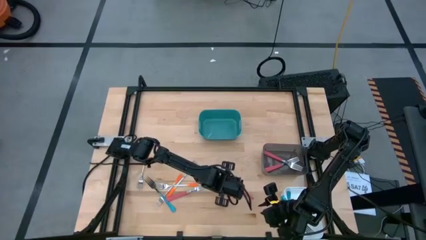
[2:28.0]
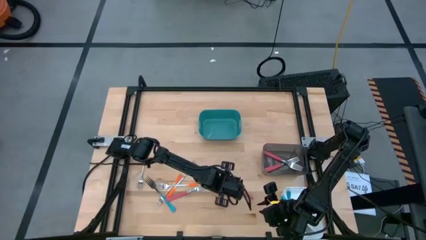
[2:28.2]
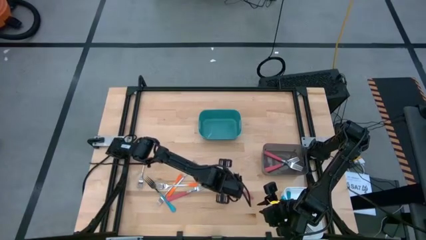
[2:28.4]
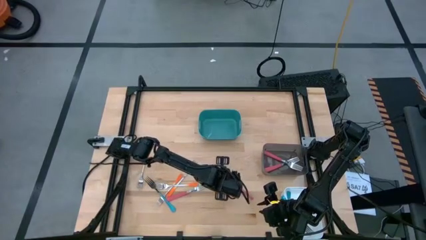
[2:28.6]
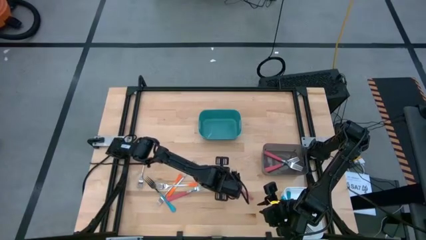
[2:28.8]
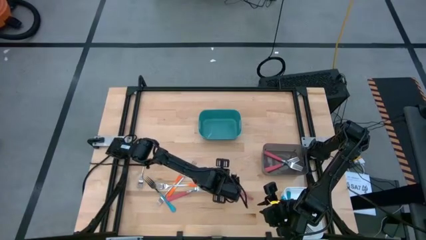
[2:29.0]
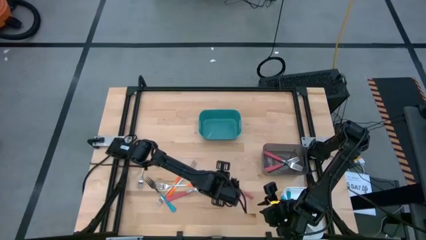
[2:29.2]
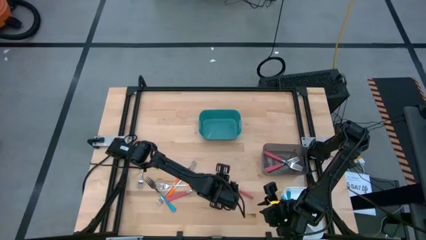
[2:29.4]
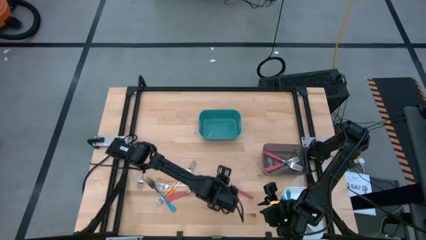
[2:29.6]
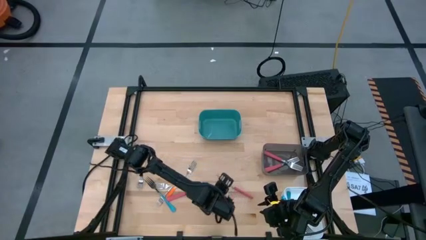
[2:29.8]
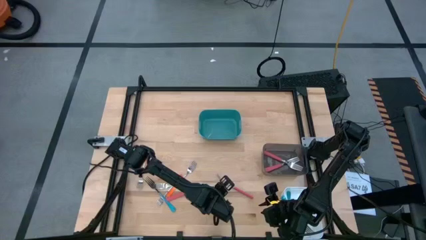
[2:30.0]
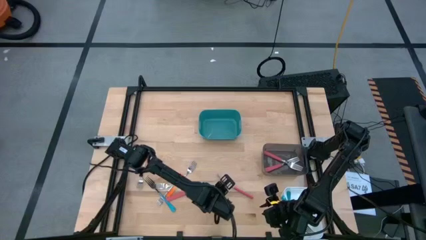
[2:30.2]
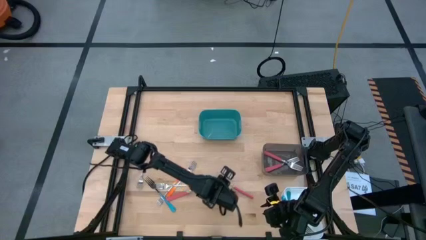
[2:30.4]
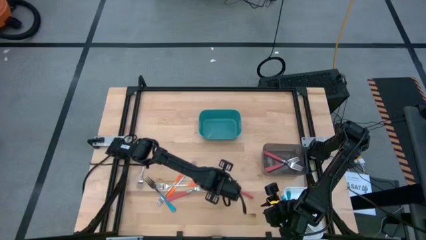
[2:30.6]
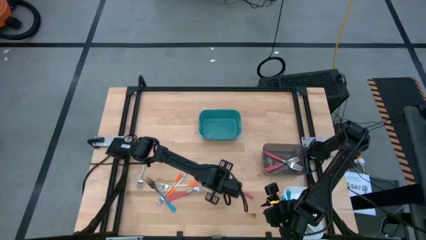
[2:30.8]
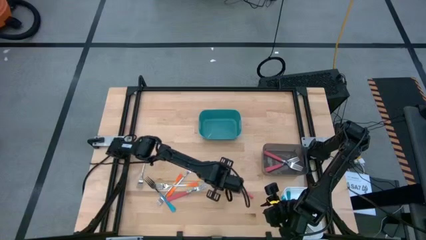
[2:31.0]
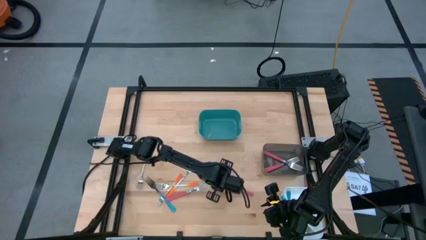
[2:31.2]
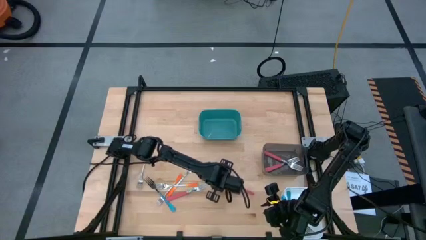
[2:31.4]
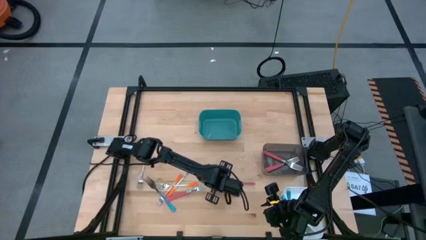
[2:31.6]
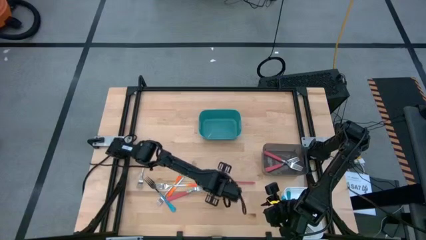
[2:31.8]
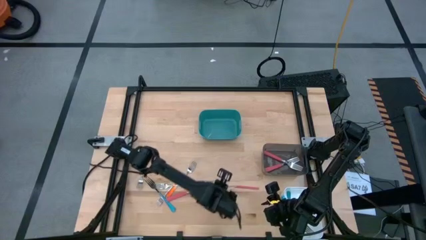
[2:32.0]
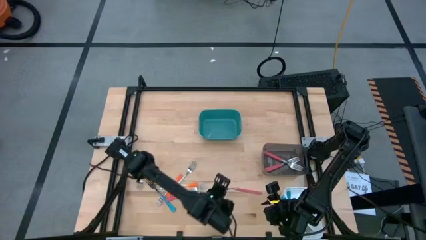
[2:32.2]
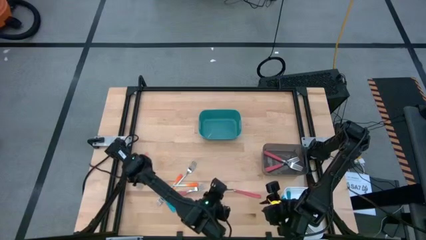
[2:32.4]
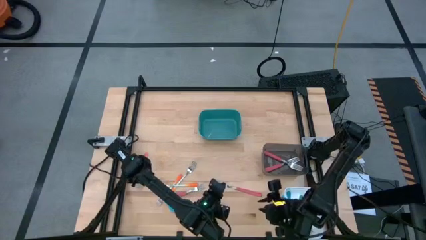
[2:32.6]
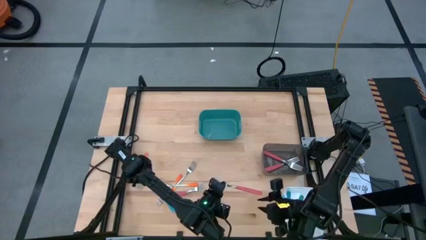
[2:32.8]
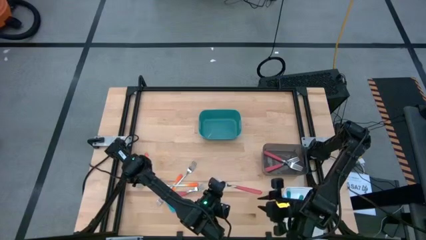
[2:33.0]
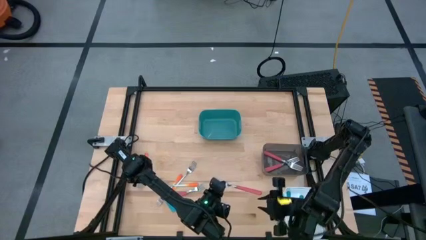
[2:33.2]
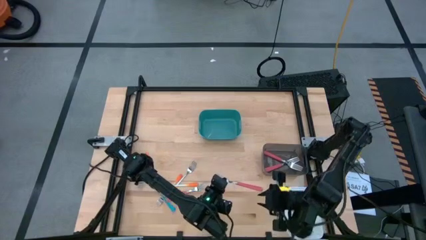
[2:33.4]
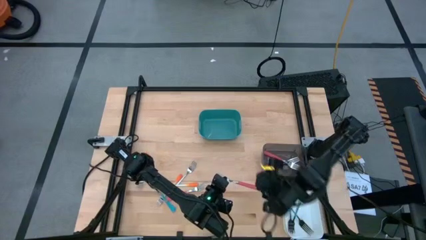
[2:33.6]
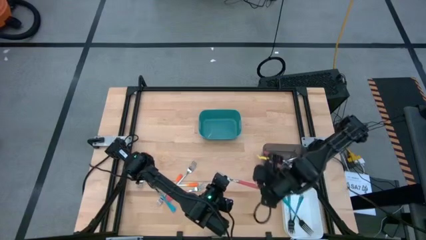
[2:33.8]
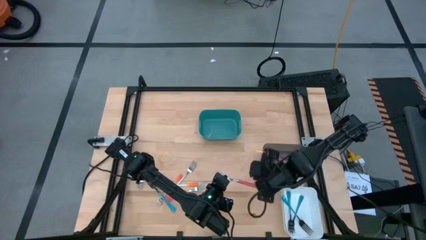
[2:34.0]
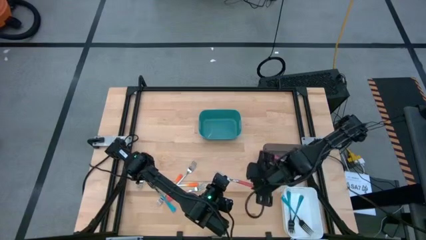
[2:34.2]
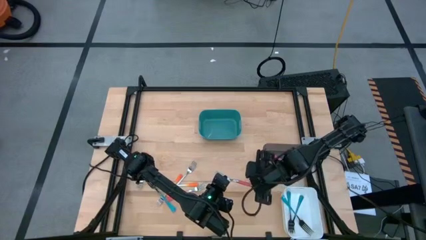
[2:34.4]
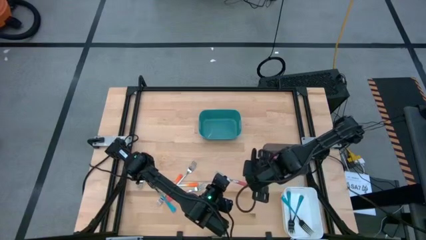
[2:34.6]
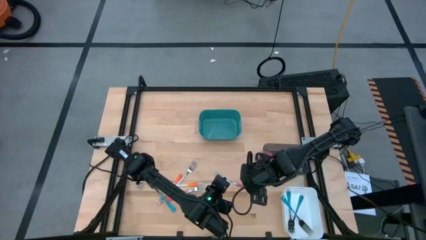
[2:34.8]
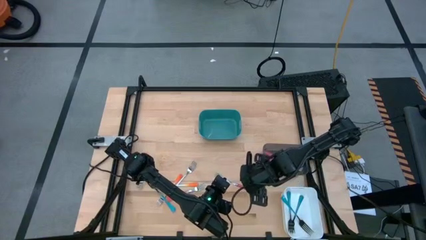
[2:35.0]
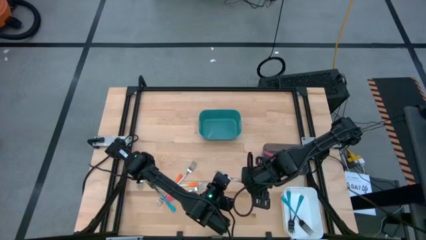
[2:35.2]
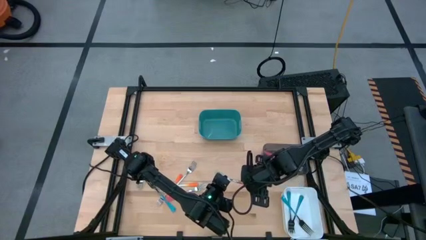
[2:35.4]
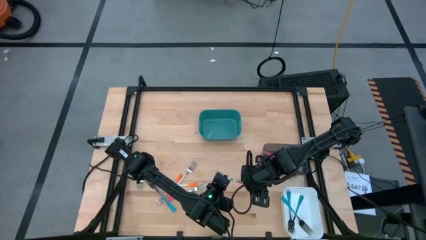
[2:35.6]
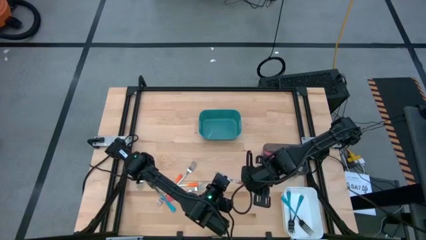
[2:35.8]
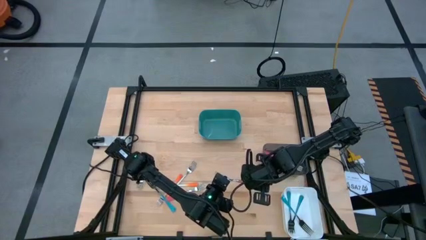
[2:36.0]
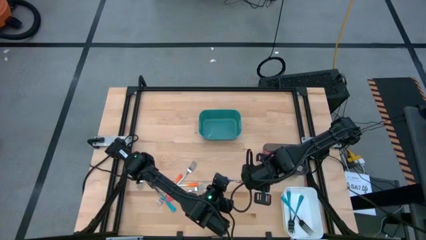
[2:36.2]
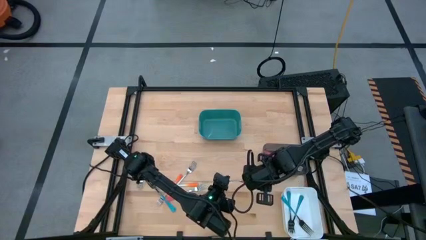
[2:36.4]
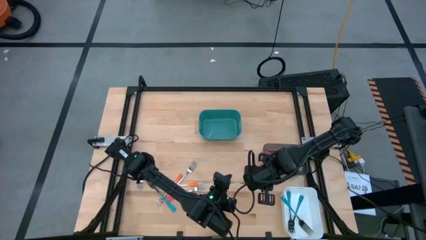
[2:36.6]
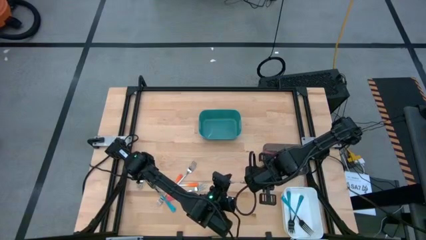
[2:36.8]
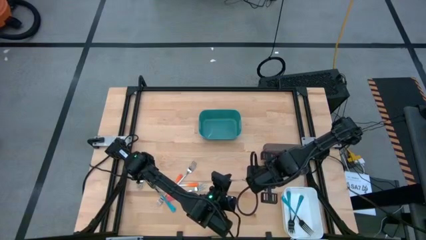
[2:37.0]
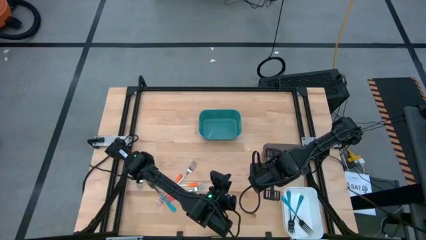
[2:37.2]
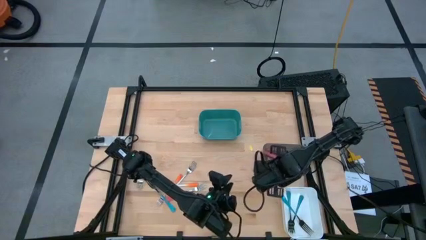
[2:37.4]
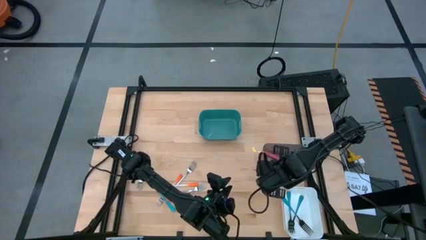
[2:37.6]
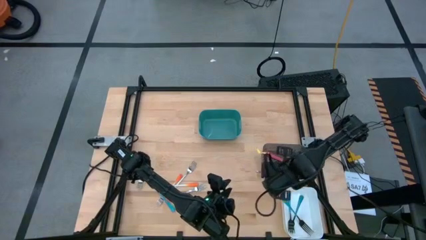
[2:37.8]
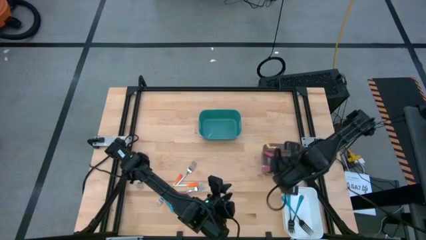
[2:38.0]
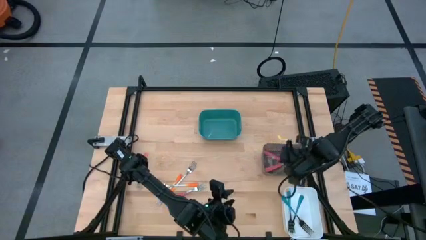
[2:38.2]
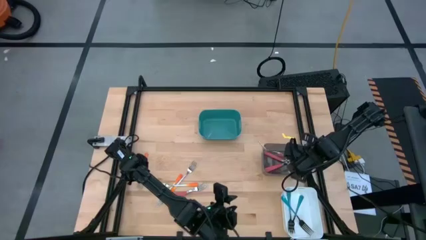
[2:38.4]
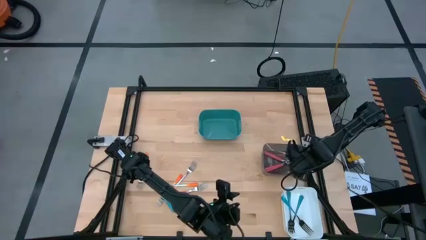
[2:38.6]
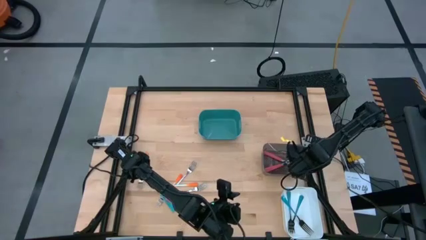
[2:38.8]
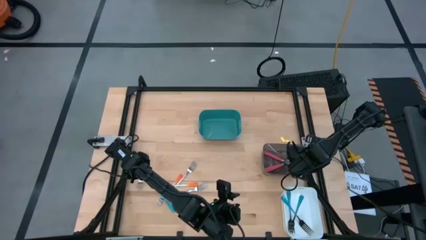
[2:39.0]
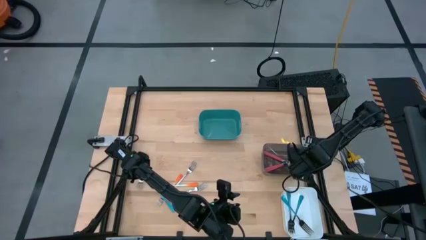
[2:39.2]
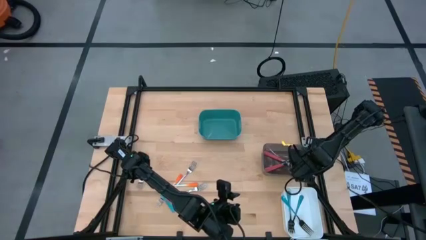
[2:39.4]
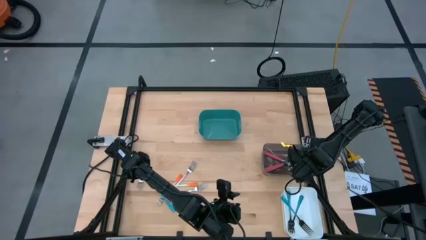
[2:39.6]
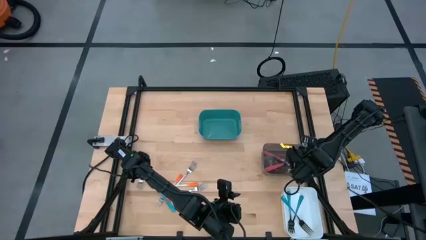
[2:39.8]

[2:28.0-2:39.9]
Task: Sort silverware by color (type)
Put the pink fork into the black bin
